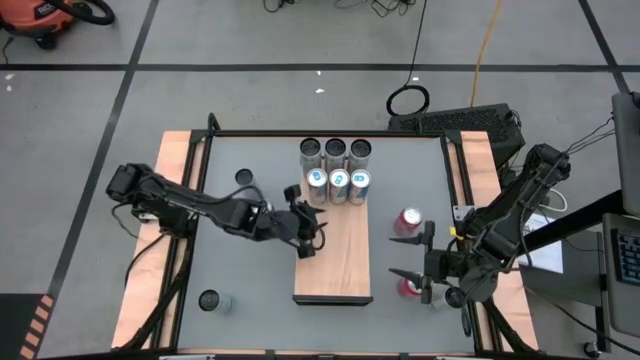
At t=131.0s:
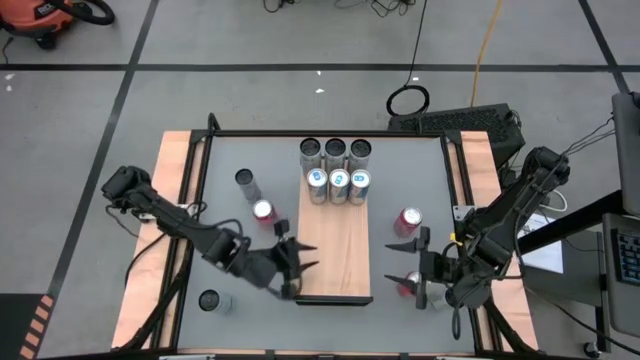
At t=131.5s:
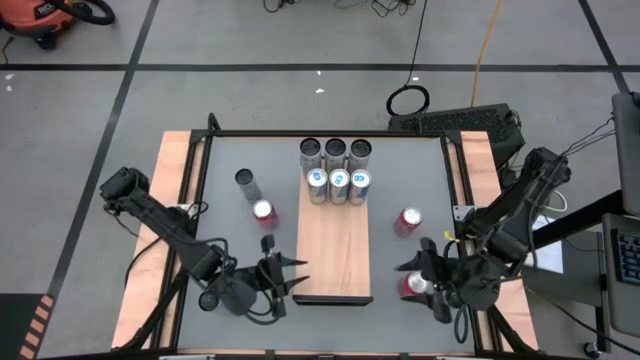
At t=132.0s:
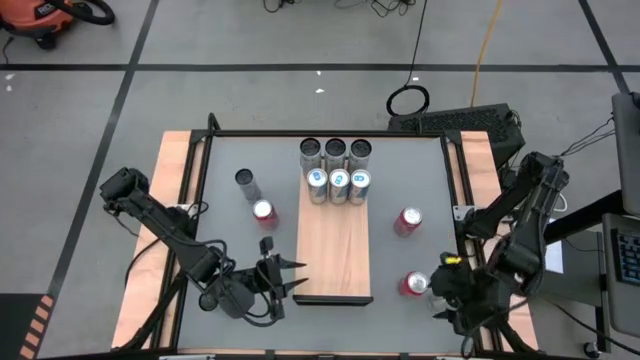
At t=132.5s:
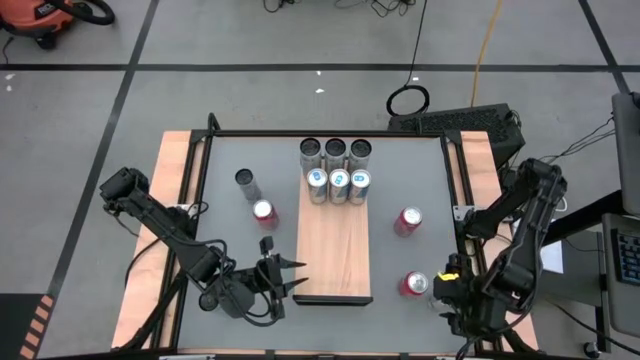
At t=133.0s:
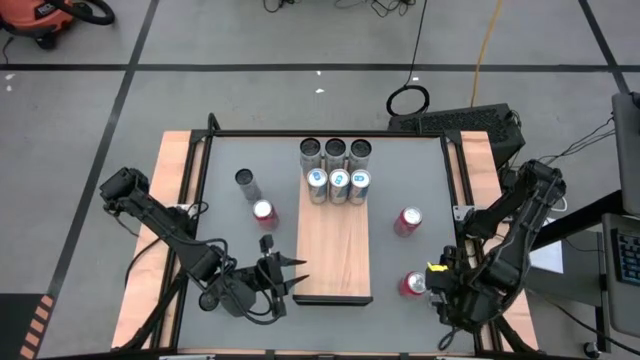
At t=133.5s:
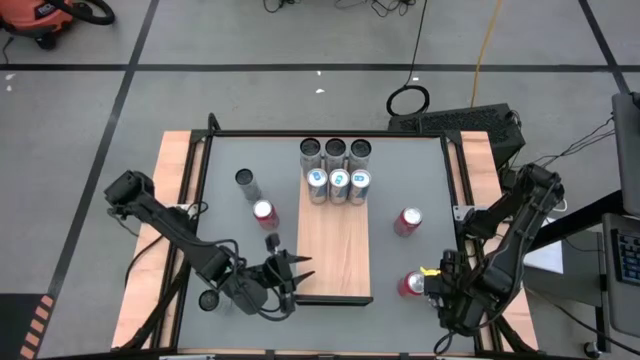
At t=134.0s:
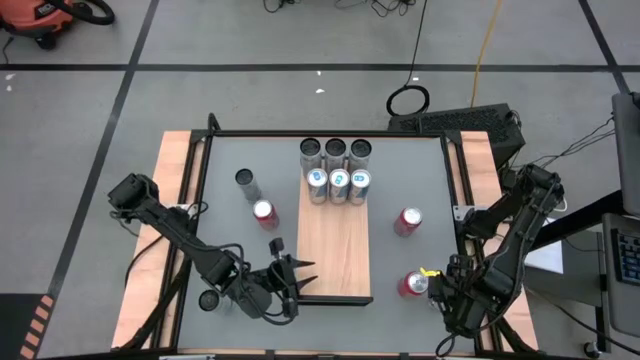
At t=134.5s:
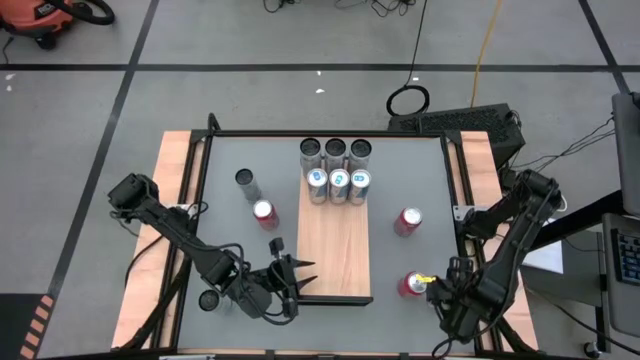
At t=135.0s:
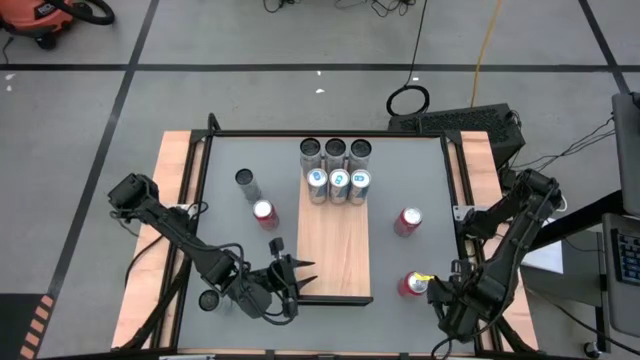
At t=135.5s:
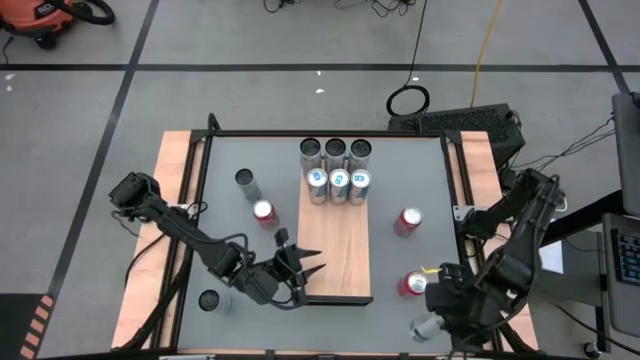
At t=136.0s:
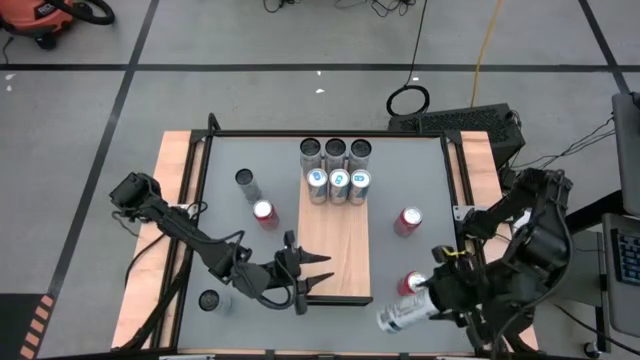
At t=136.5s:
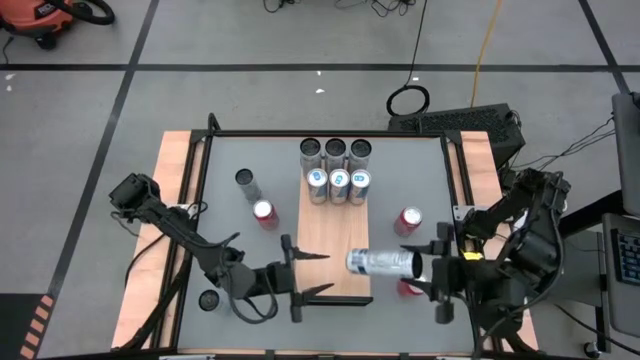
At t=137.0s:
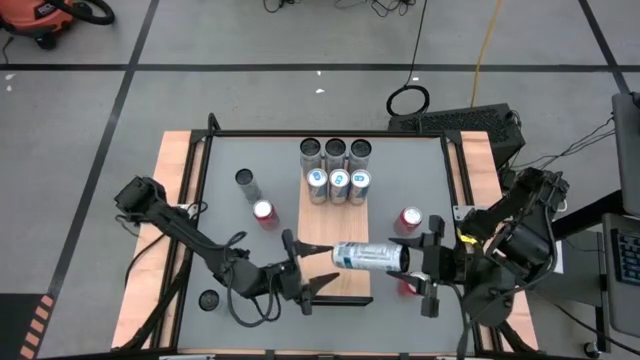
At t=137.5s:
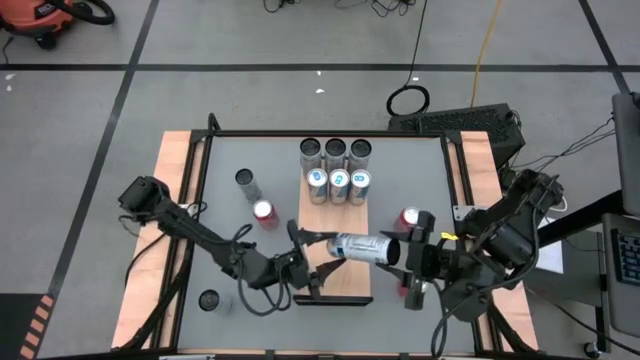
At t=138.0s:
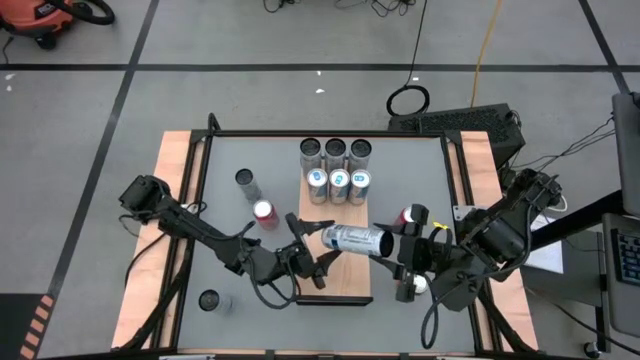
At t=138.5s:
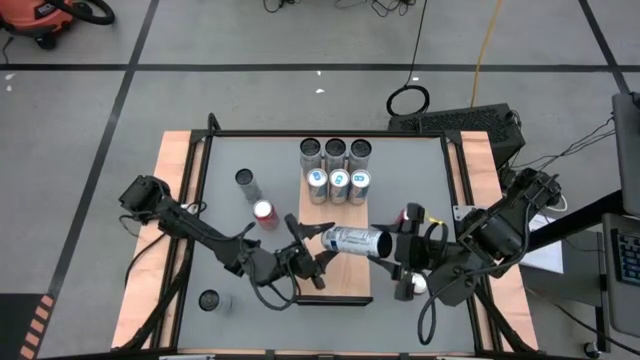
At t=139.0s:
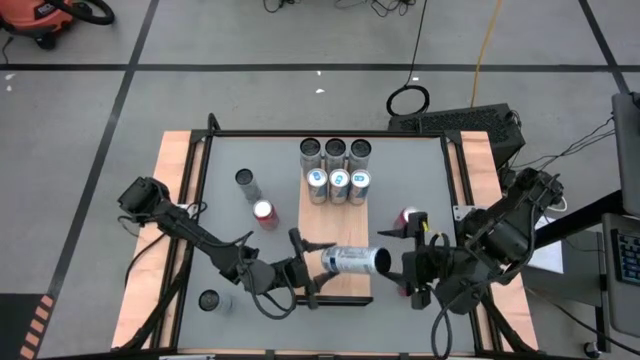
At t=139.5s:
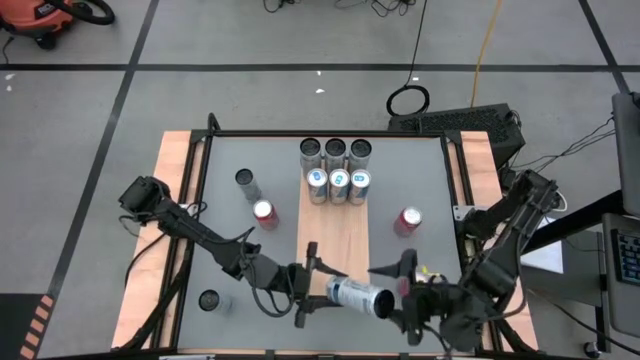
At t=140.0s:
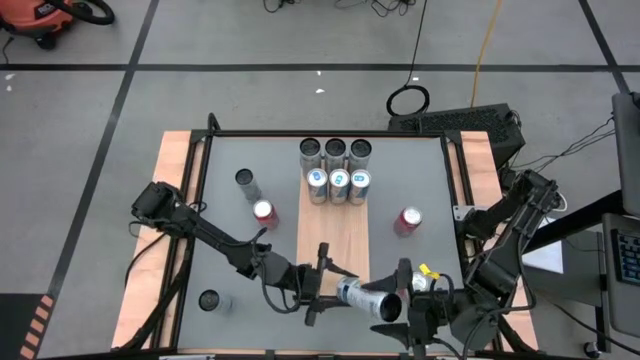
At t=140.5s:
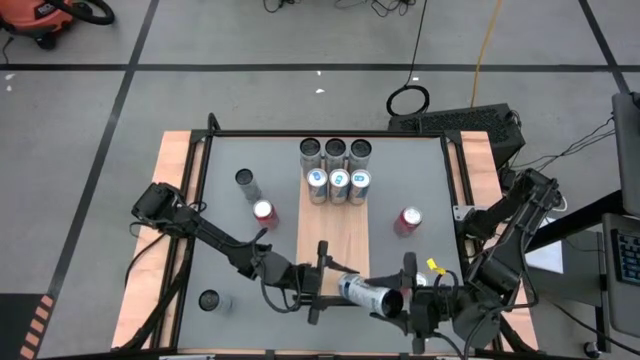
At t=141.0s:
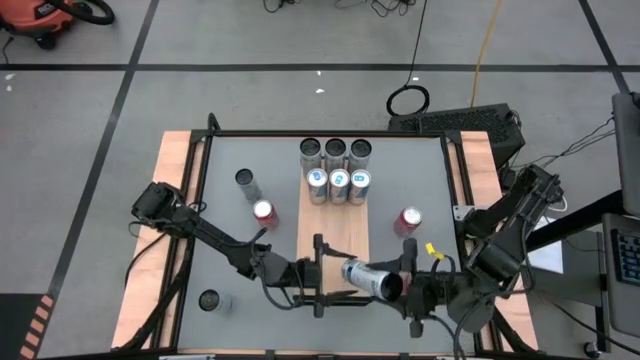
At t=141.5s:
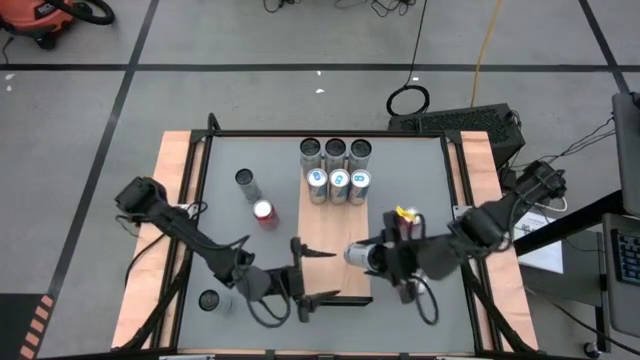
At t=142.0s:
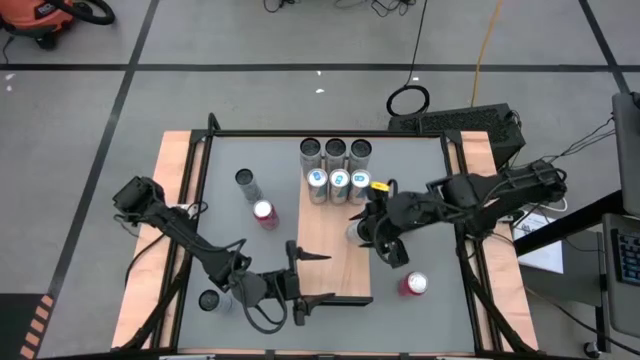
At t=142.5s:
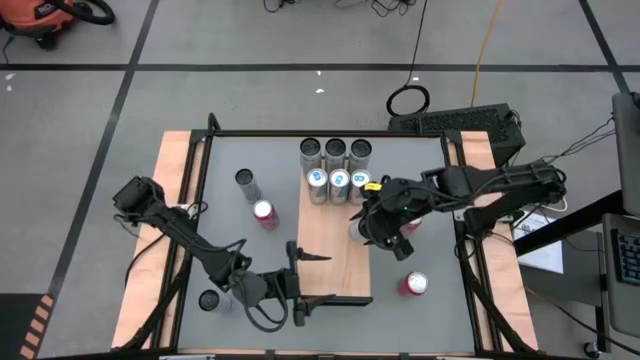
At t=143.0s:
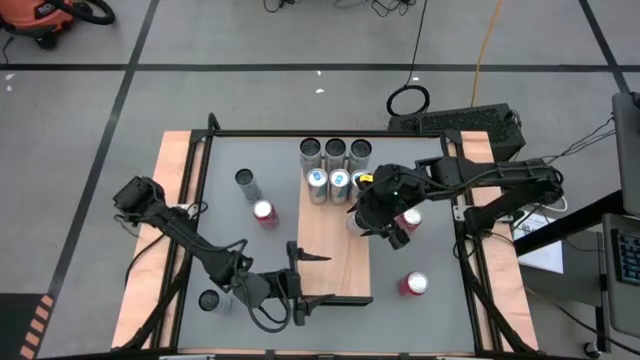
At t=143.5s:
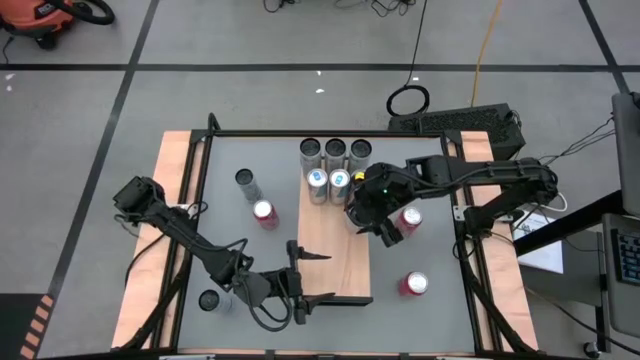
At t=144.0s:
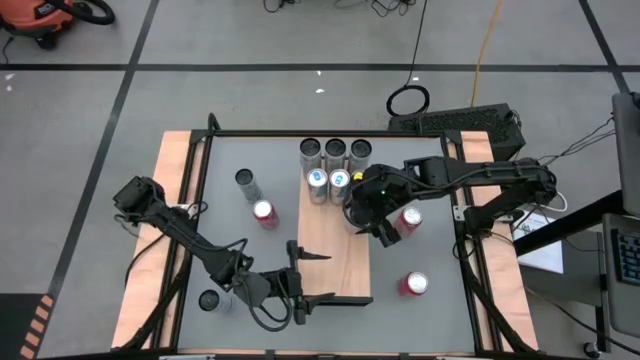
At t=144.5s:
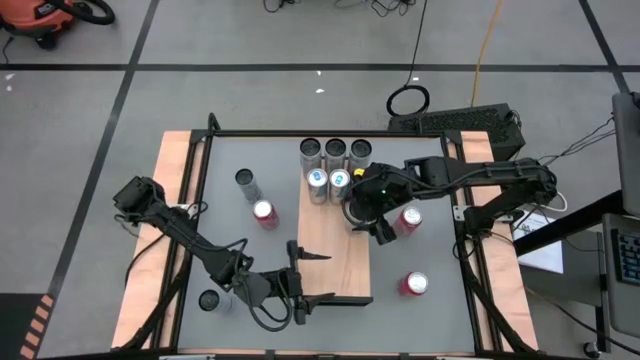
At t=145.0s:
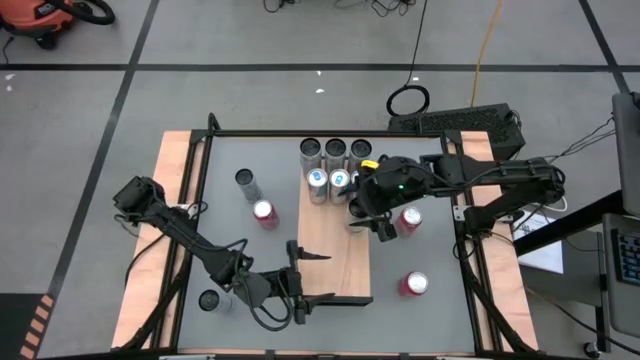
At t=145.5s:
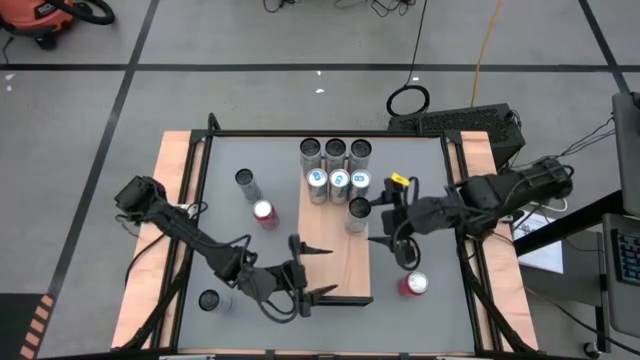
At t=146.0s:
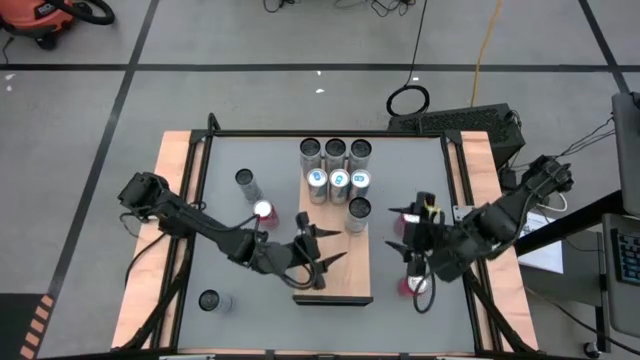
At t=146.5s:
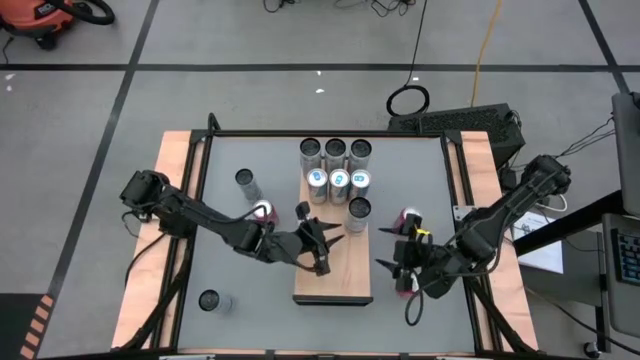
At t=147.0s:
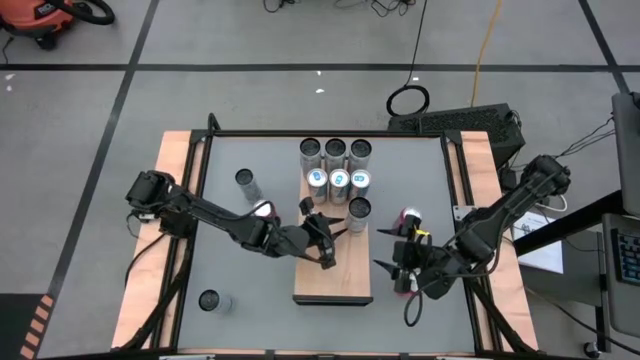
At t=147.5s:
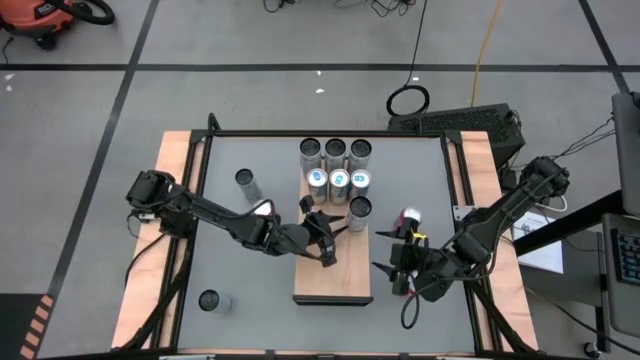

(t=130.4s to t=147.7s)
Task: Place canned beverage on shelf
Put the bottom right white blue soda can on the shelf

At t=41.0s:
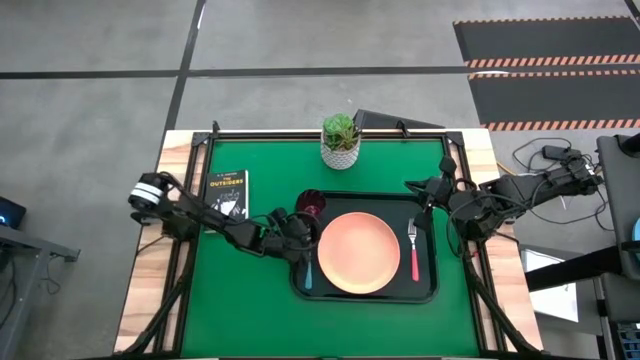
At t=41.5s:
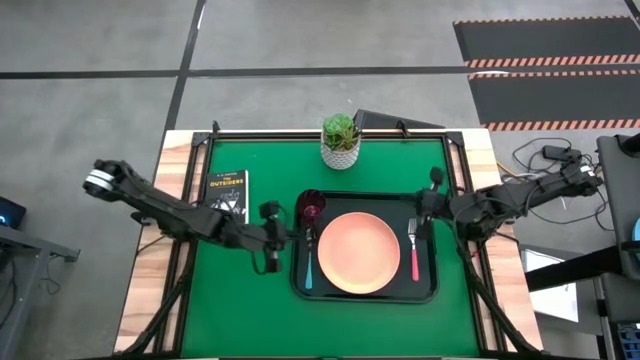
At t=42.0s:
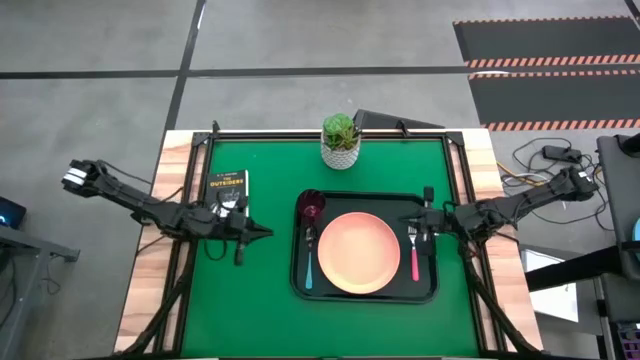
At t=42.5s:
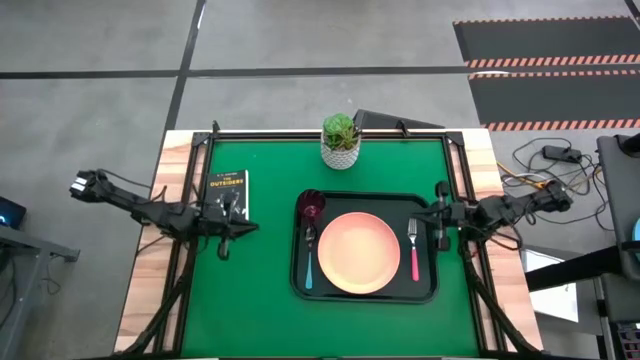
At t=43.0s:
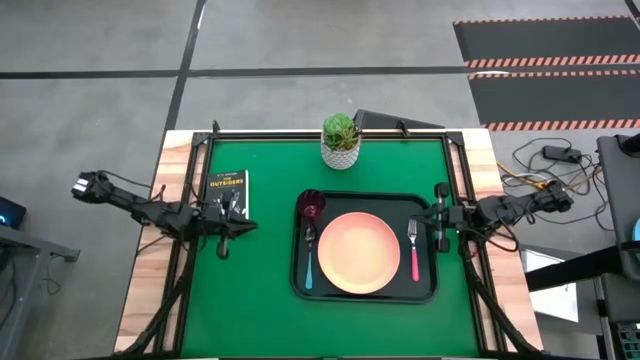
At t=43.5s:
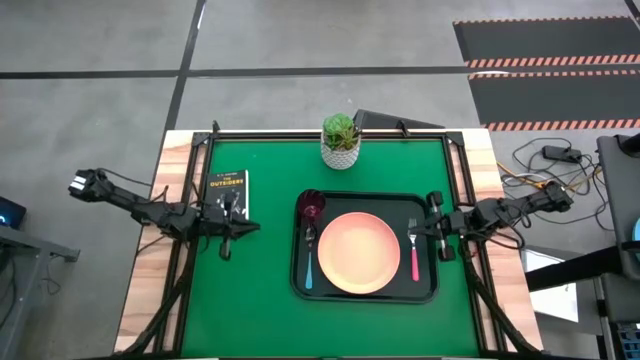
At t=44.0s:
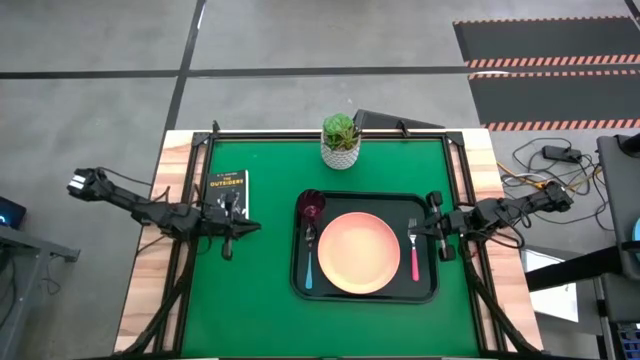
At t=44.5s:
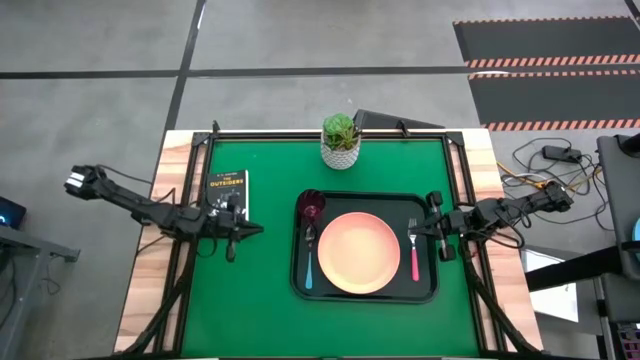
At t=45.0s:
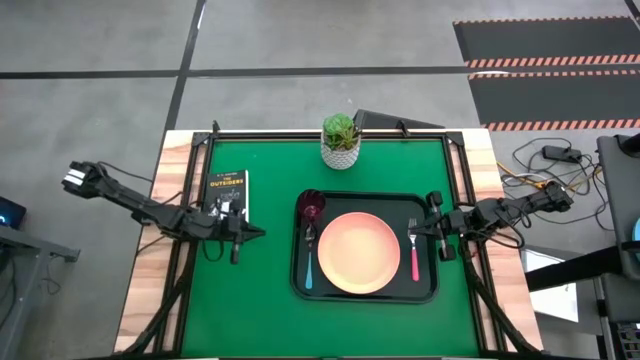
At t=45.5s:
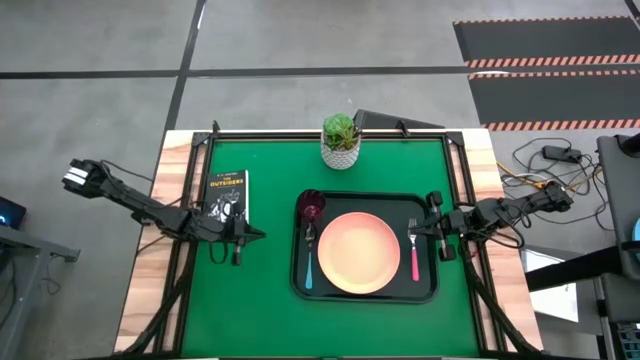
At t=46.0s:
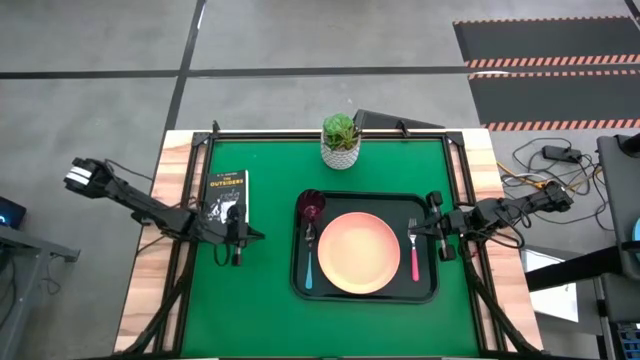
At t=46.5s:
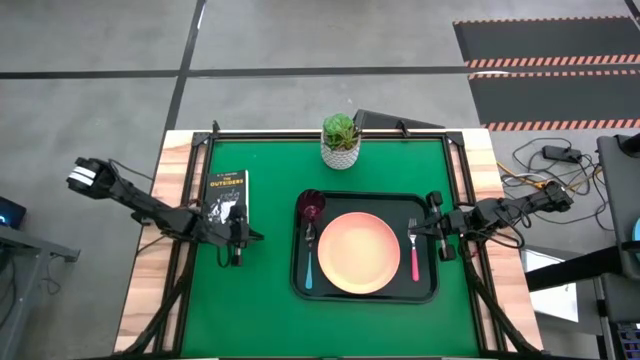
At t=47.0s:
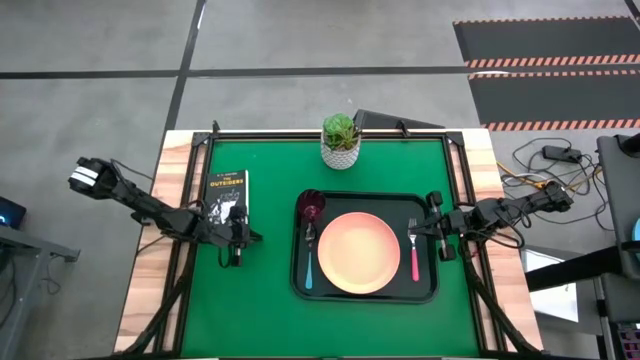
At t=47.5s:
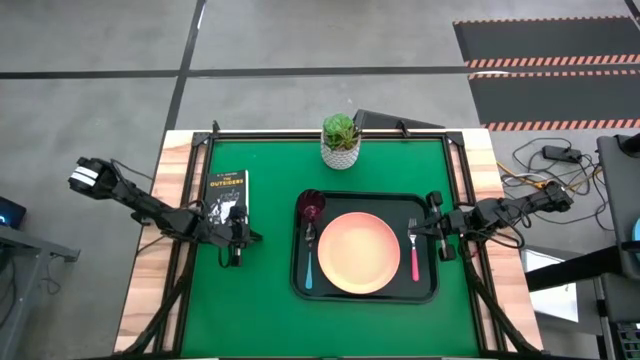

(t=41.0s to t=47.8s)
Task: Pick and place plate/cup/fork/spoon on tray
Return to Home Position
